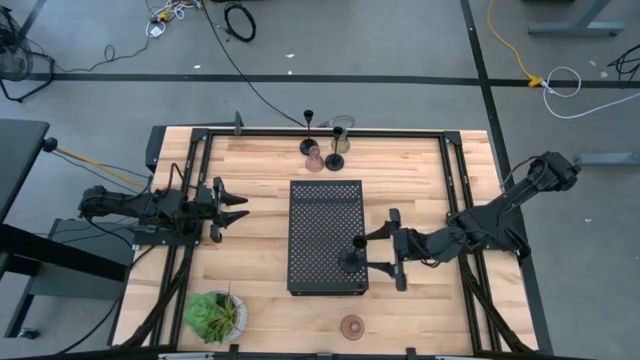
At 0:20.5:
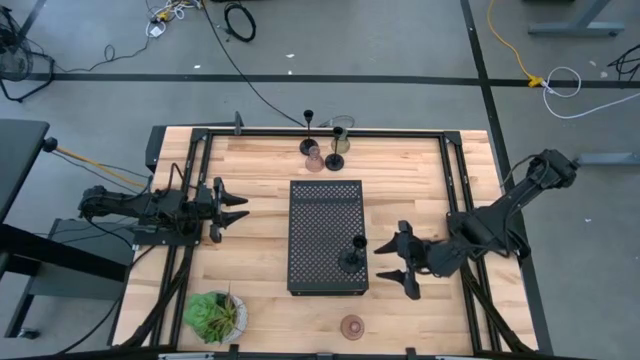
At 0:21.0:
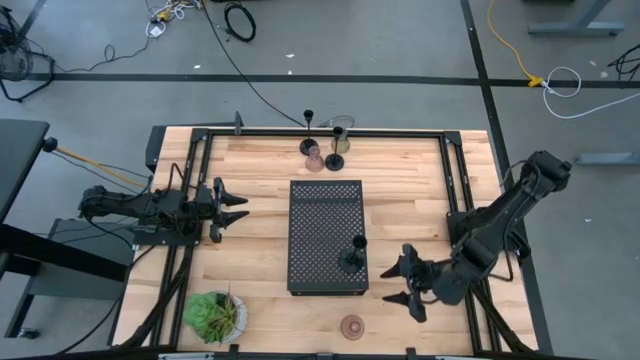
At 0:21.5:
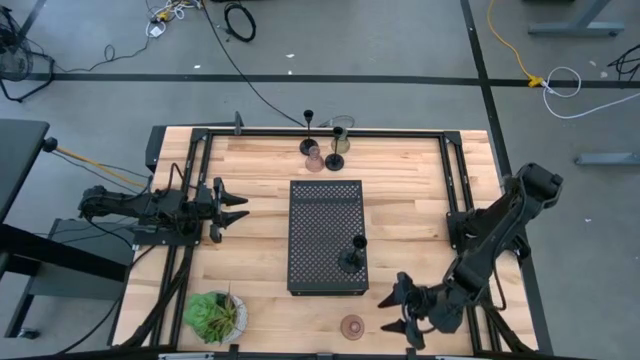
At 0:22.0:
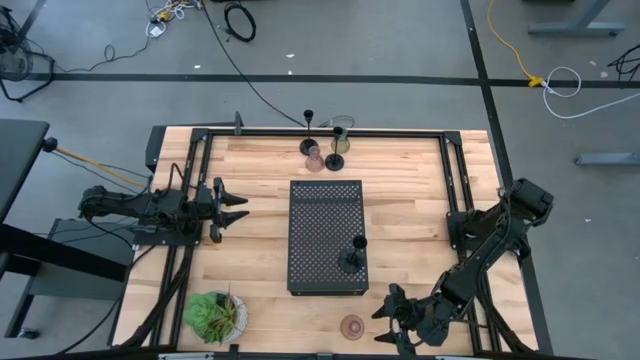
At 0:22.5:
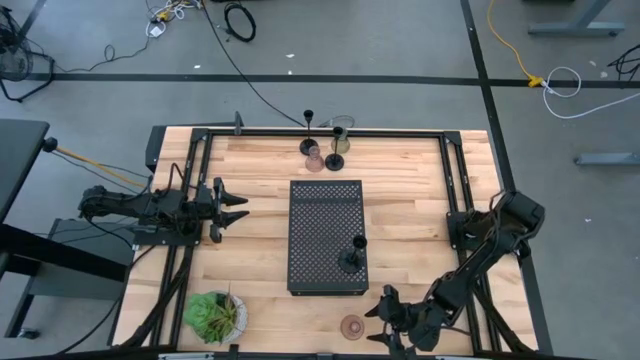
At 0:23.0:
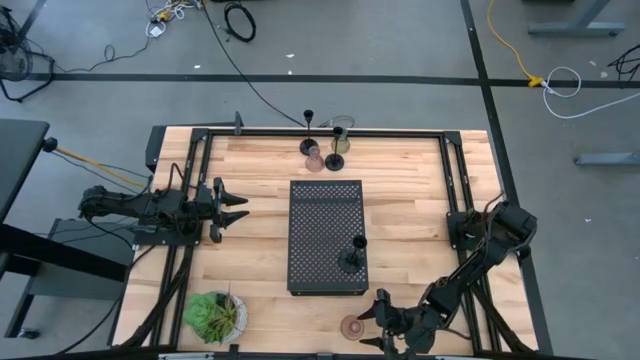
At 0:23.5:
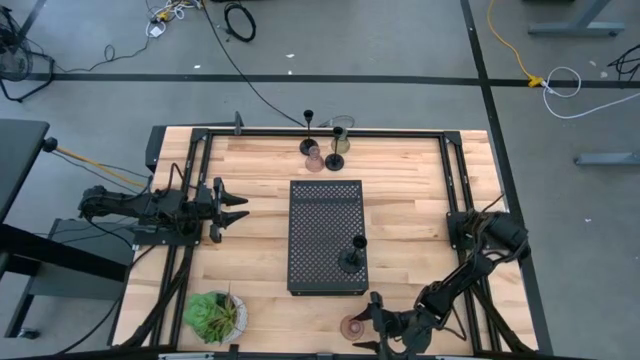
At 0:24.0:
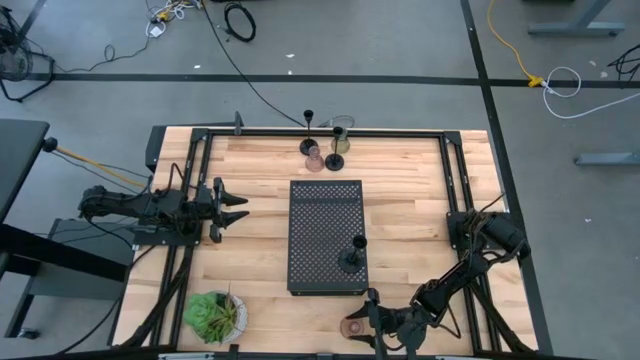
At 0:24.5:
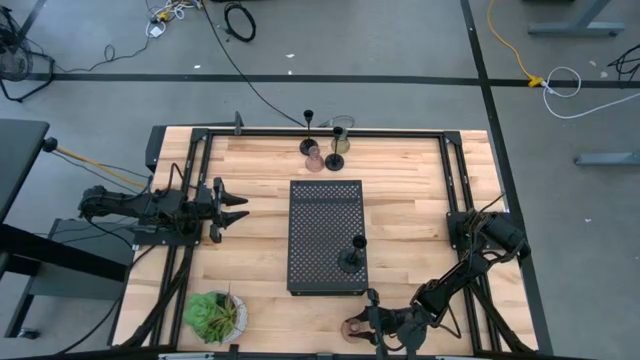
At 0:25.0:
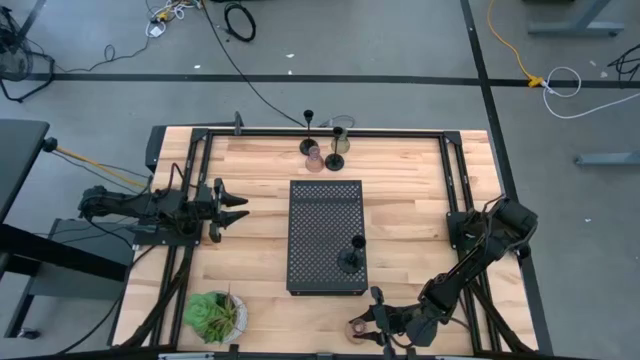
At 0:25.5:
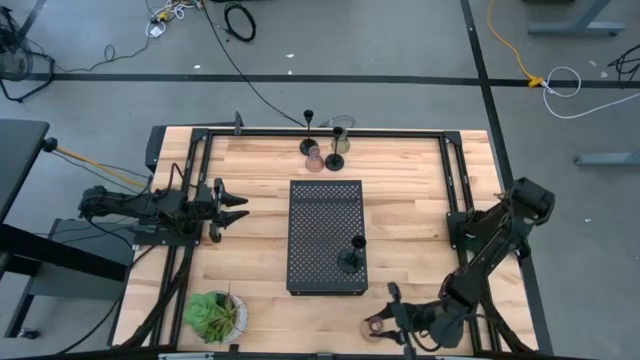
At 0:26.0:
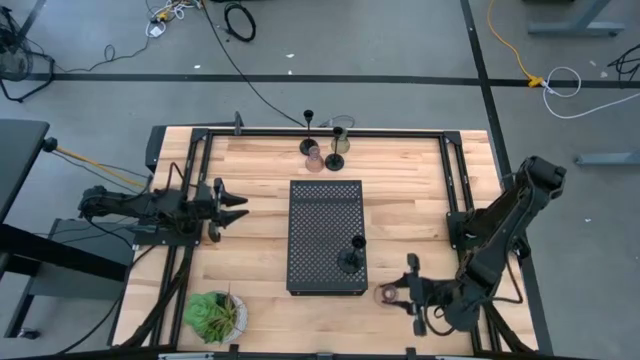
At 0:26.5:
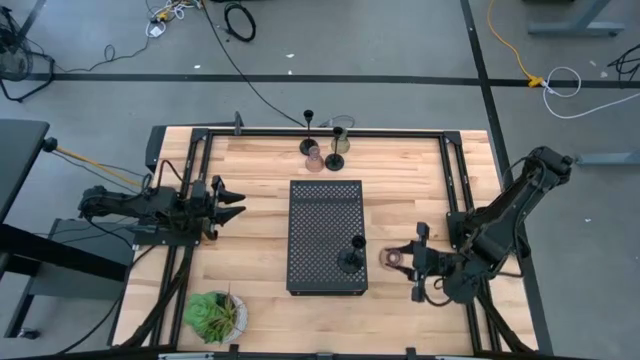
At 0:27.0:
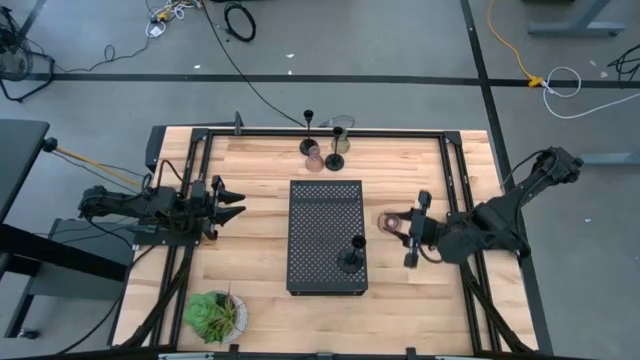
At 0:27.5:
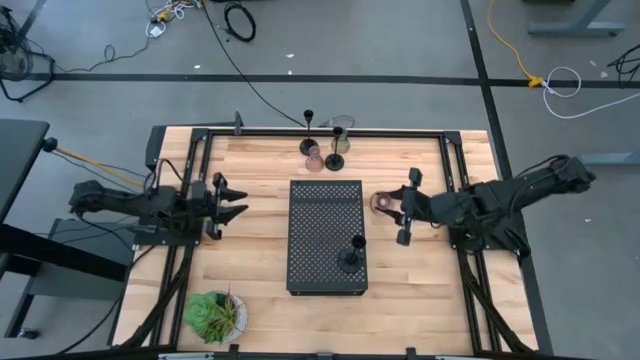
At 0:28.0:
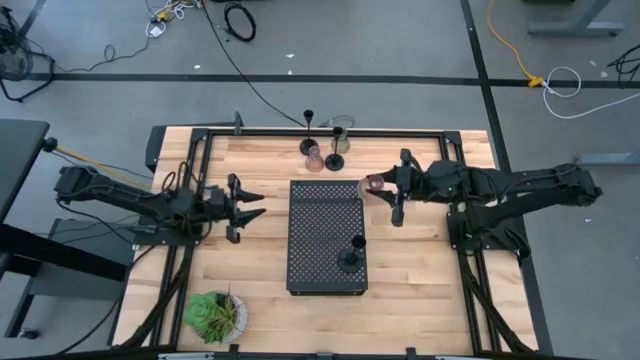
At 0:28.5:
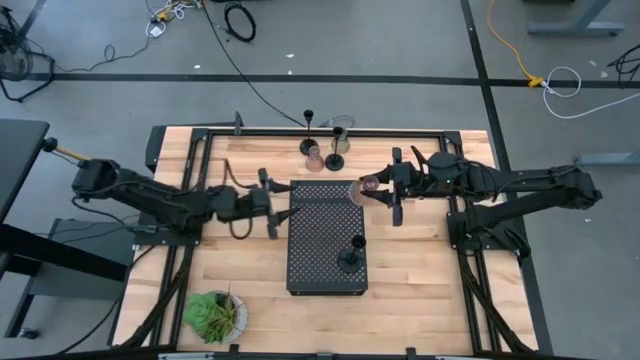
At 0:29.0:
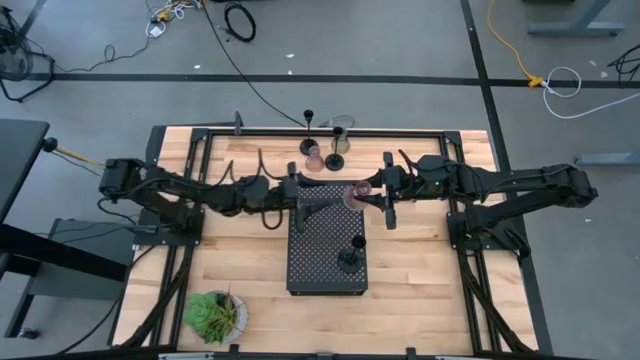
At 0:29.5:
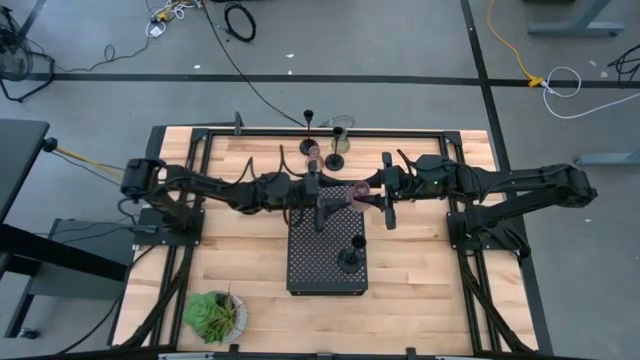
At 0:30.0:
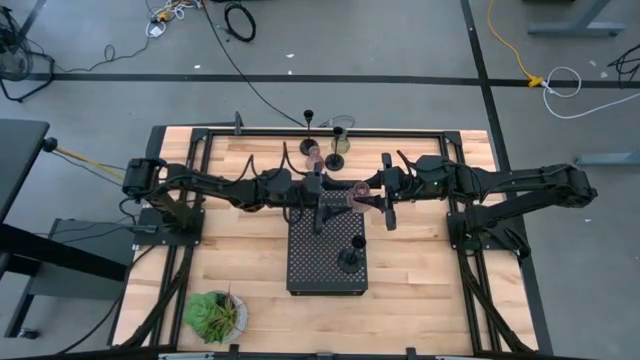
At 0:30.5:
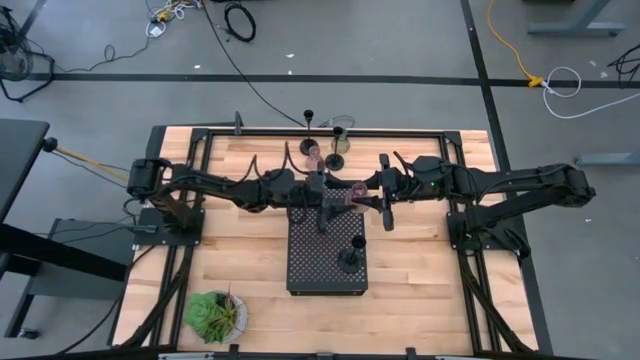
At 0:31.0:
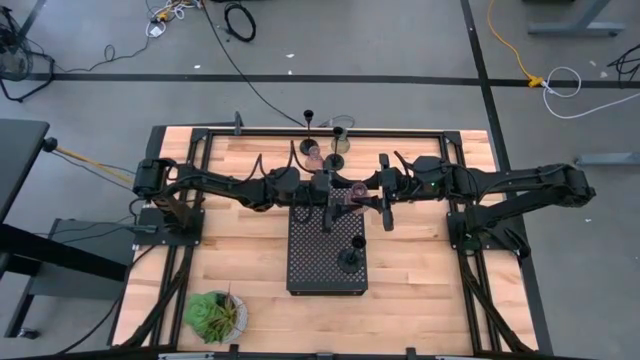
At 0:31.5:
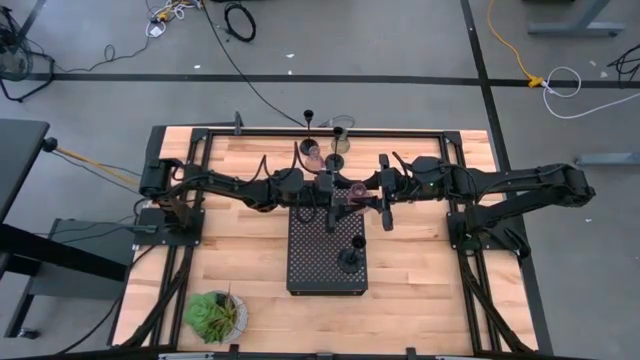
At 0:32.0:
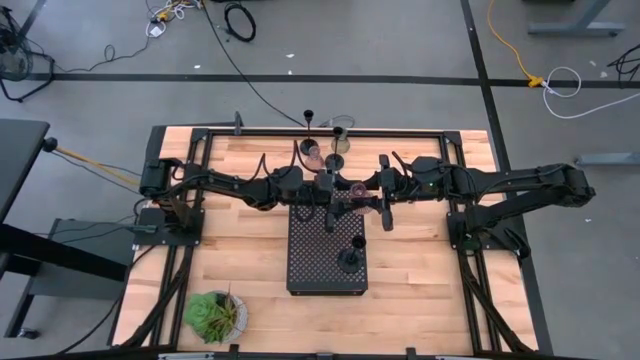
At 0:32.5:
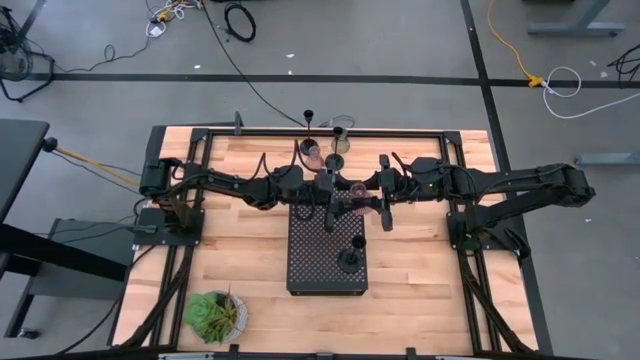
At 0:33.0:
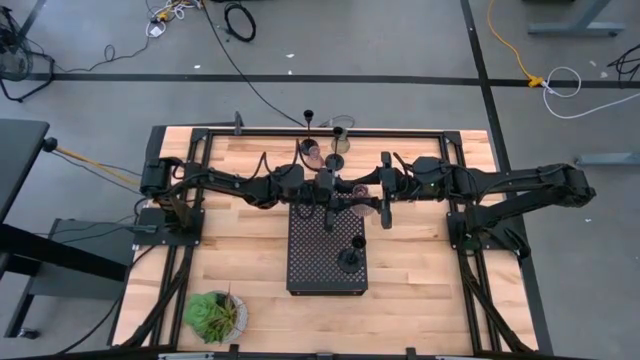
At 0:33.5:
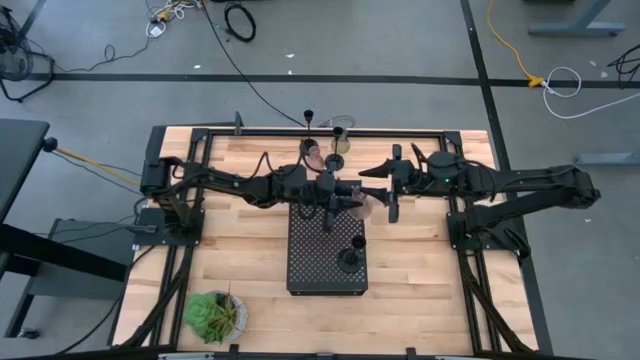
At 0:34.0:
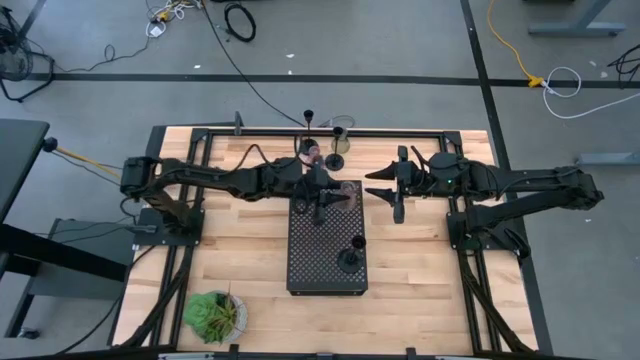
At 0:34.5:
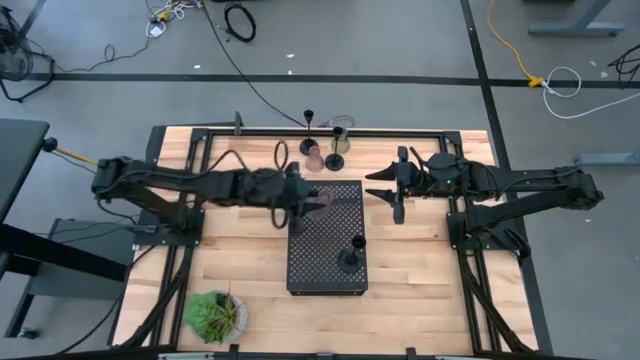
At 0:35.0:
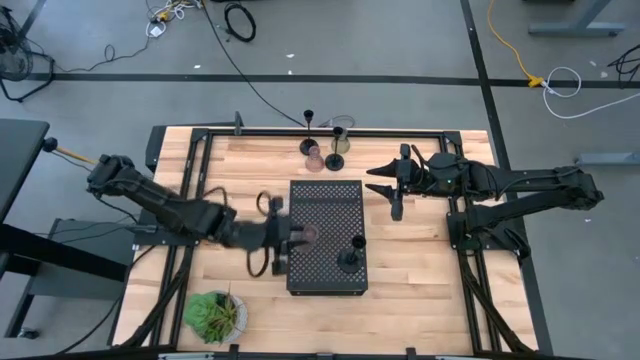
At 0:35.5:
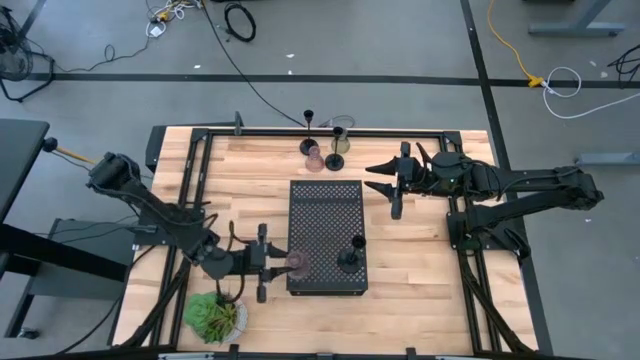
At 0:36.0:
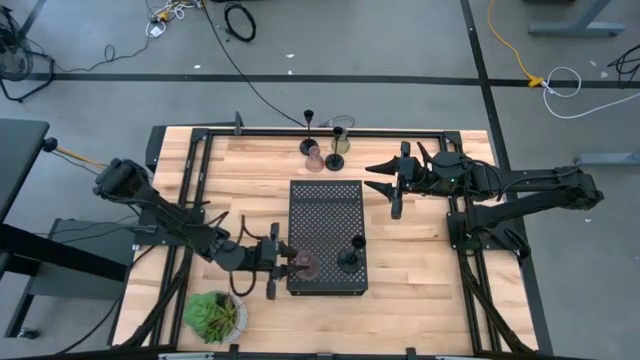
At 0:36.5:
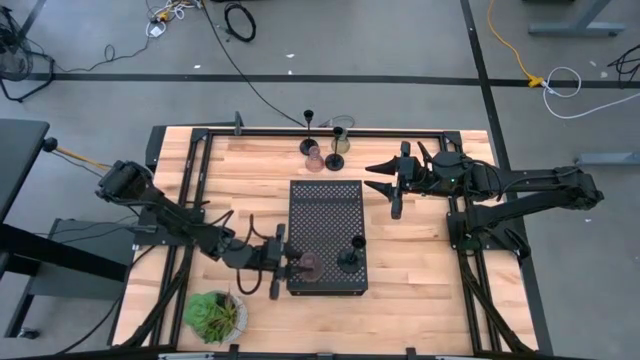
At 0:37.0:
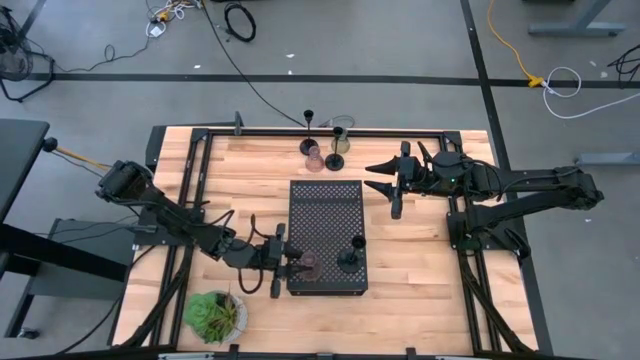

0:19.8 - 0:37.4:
Task: Pick & Place candle stick holders
Put the bottom pink glass candle holder on the shelf

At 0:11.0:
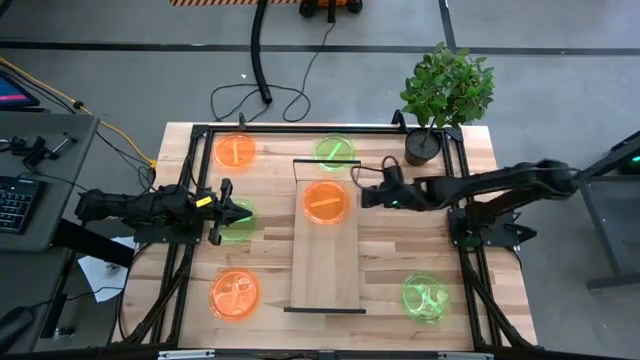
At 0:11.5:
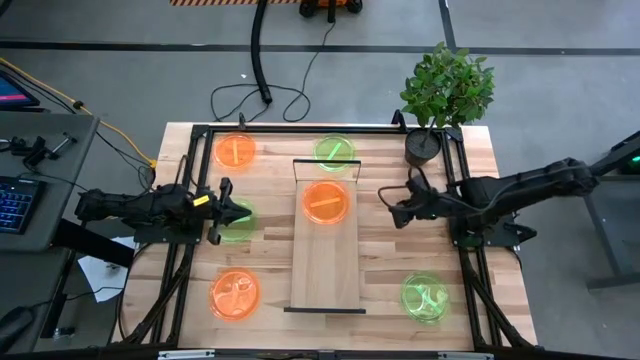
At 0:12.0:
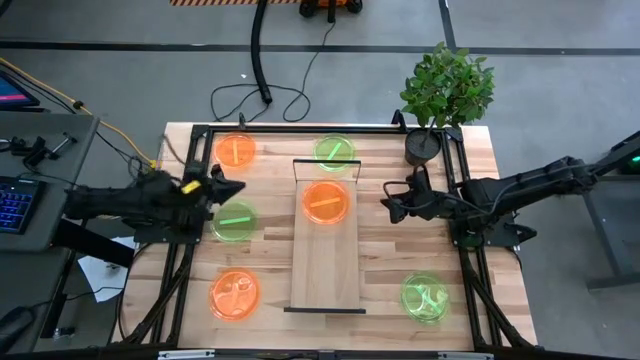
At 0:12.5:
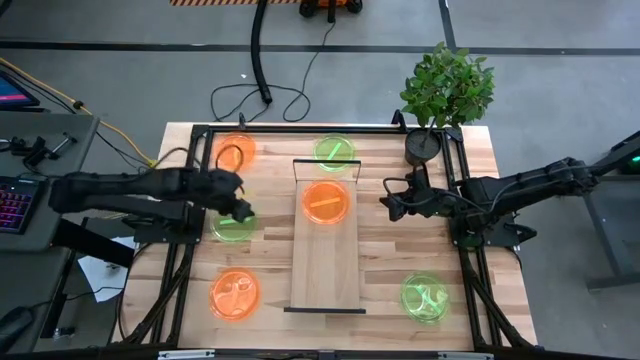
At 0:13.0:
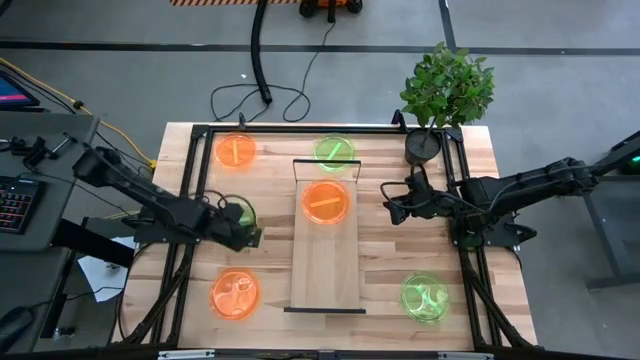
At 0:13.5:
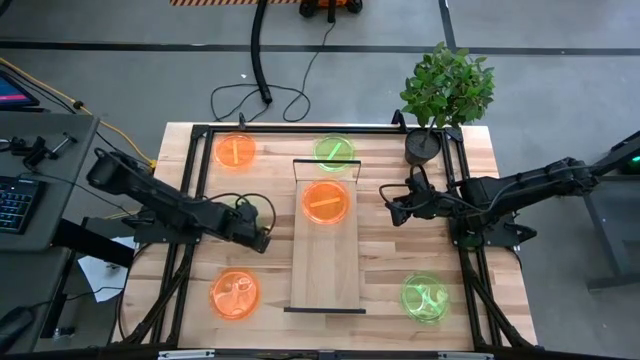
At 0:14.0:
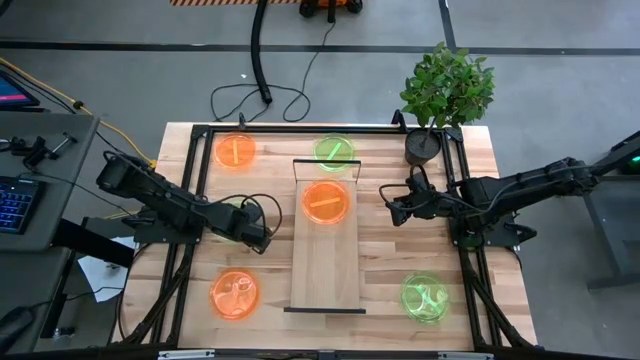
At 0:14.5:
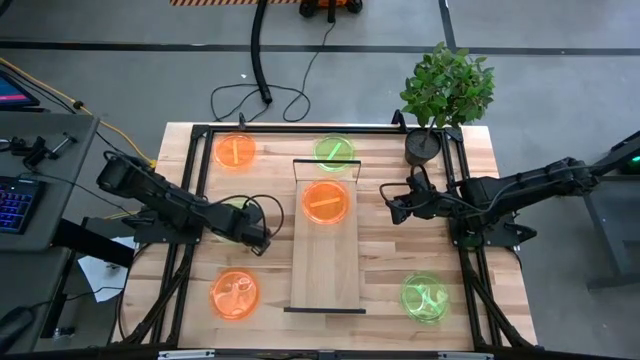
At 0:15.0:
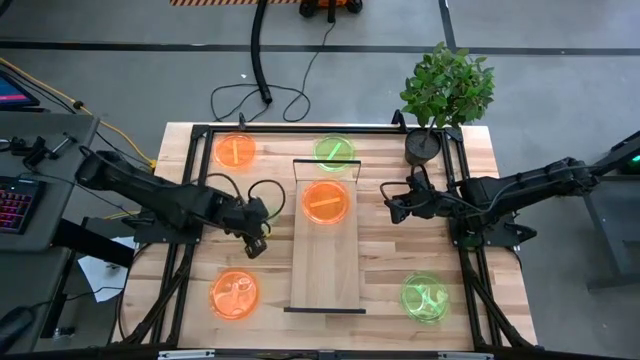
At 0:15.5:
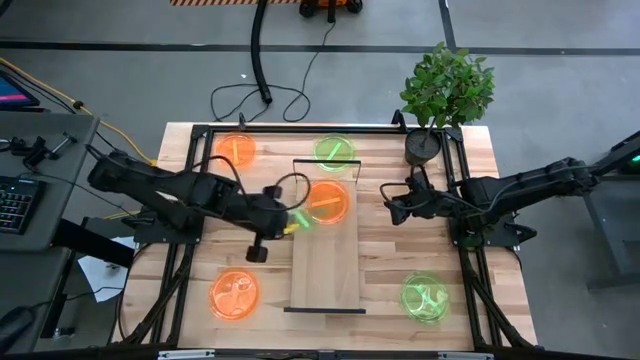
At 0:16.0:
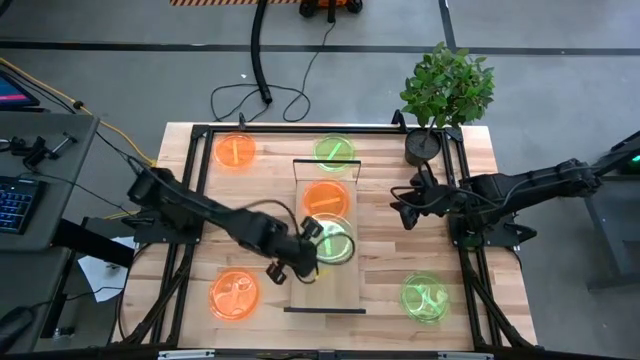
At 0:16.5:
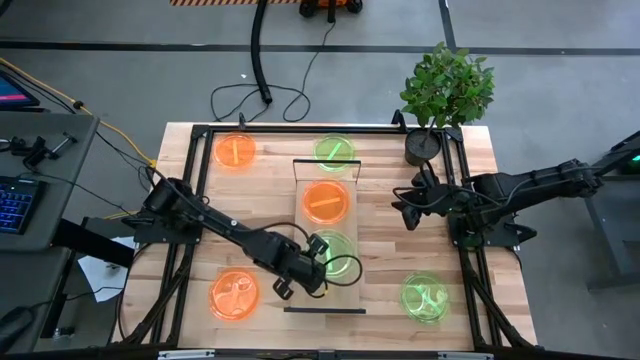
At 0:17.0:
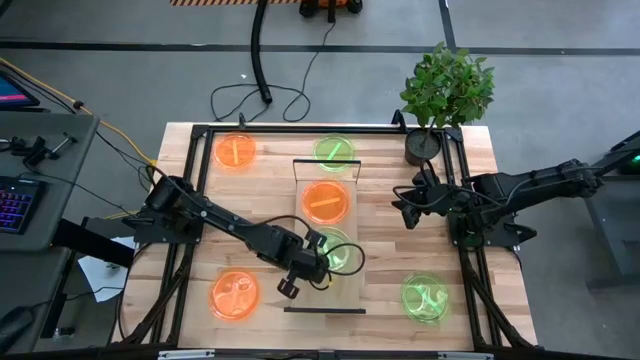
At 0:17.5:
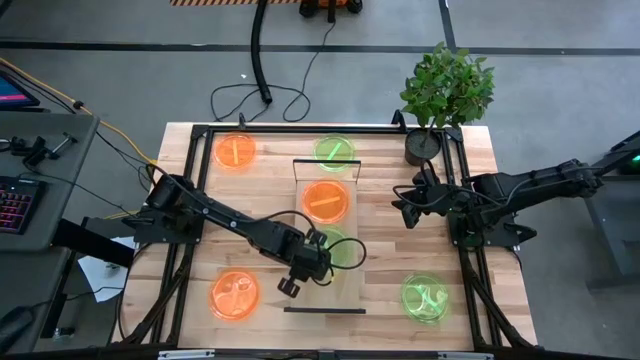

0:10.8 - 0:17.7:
Task: Place and stack plates onto a shelf
Put the middle left green plate on the shelf
